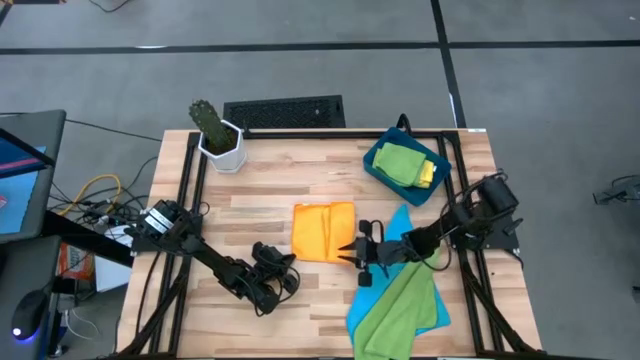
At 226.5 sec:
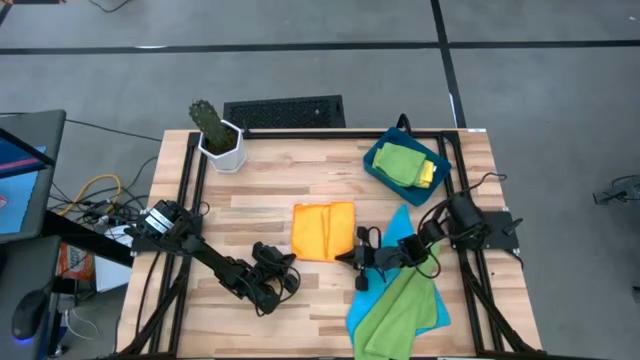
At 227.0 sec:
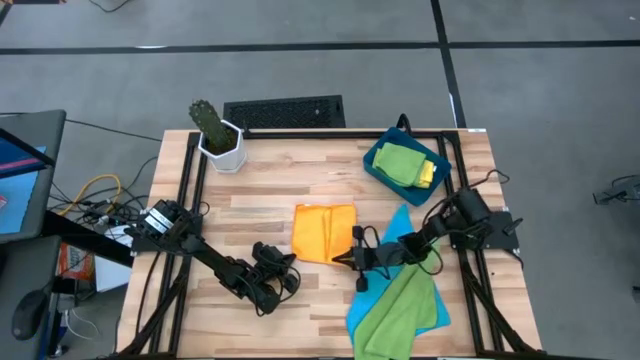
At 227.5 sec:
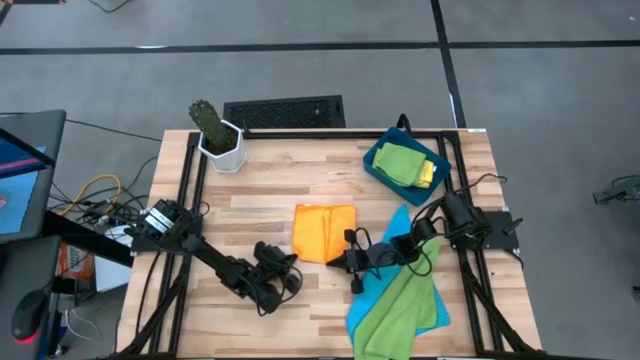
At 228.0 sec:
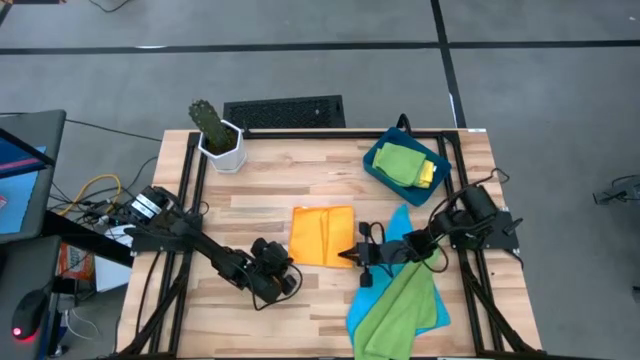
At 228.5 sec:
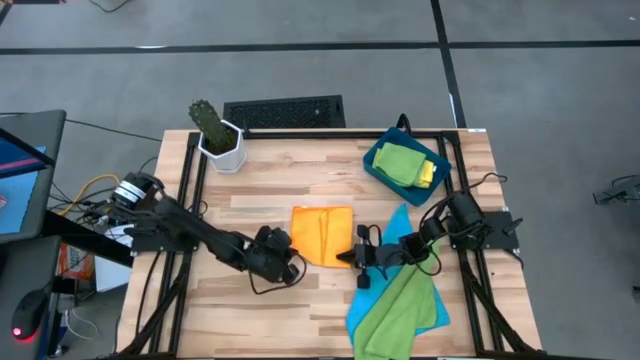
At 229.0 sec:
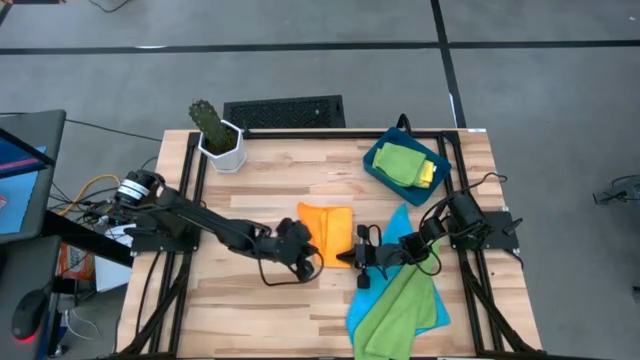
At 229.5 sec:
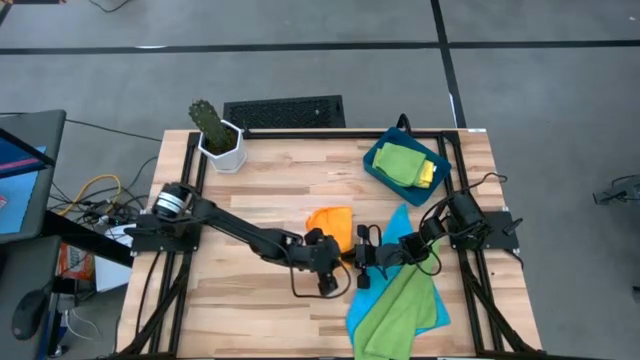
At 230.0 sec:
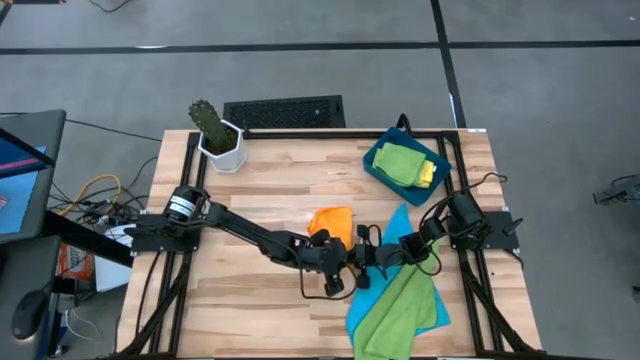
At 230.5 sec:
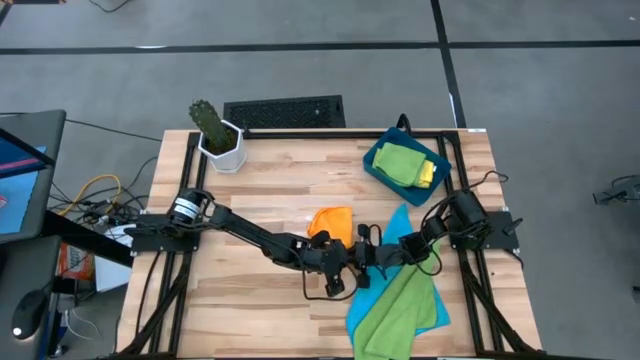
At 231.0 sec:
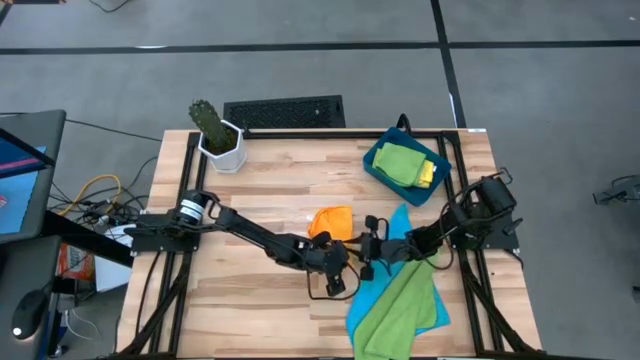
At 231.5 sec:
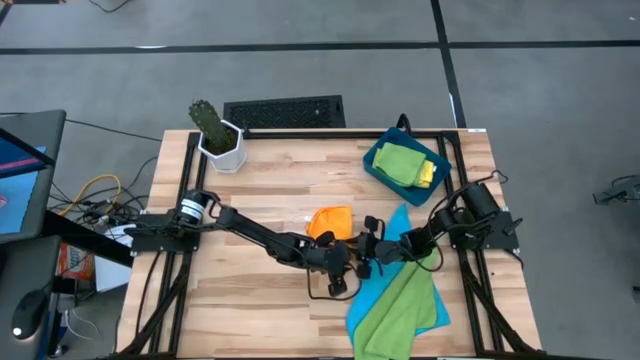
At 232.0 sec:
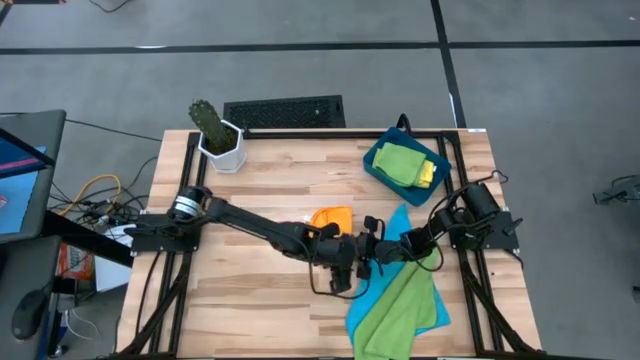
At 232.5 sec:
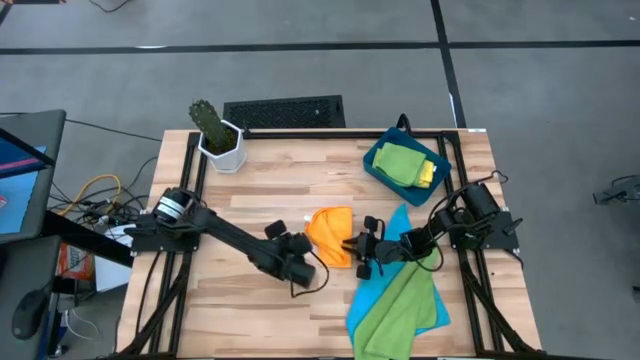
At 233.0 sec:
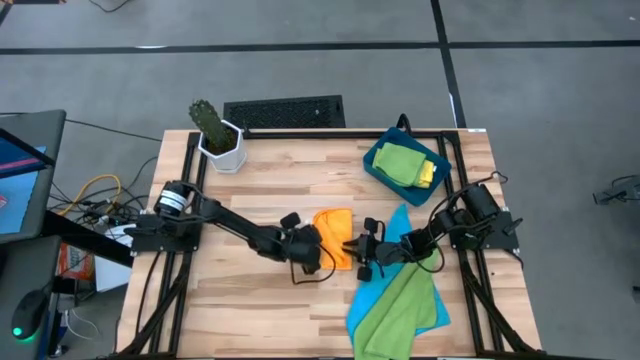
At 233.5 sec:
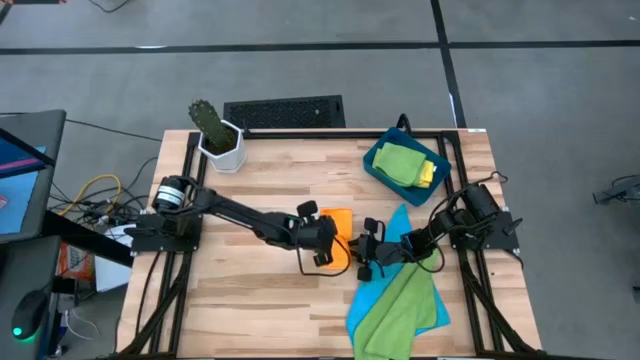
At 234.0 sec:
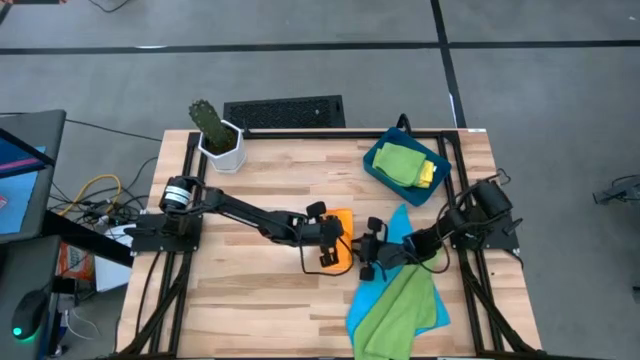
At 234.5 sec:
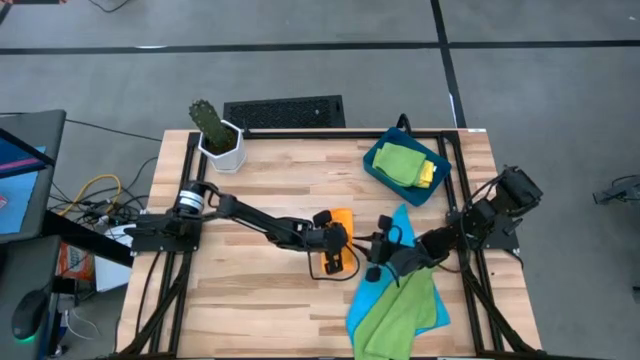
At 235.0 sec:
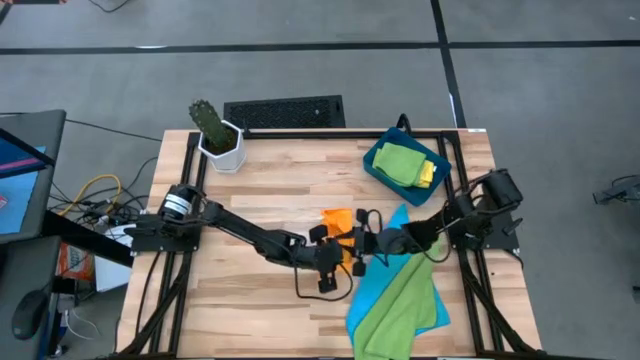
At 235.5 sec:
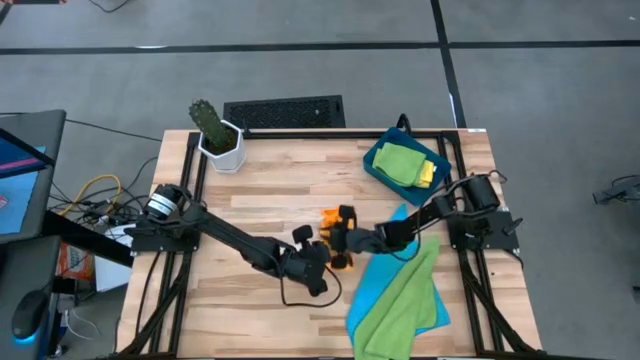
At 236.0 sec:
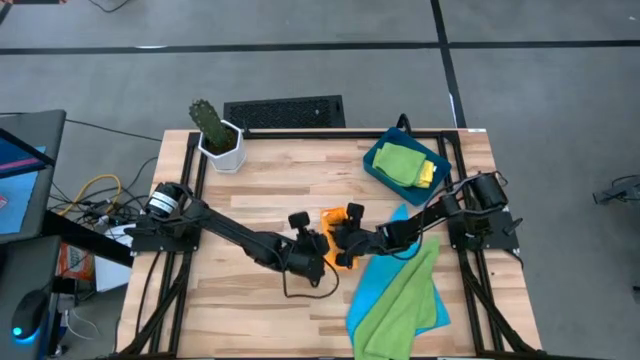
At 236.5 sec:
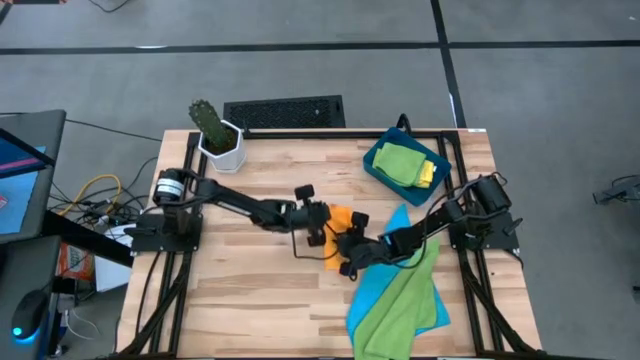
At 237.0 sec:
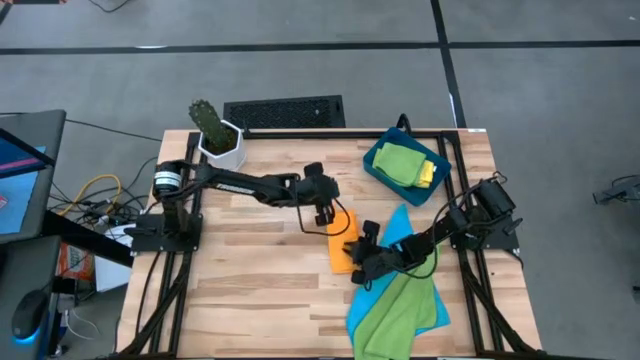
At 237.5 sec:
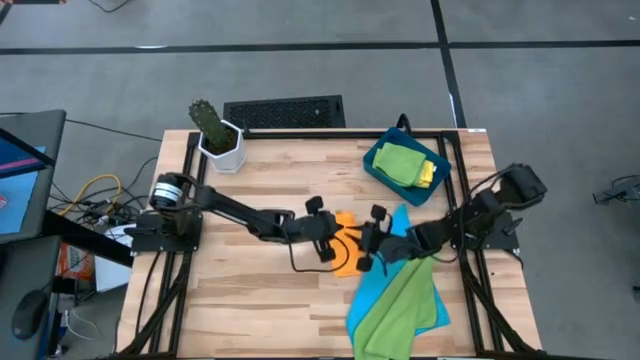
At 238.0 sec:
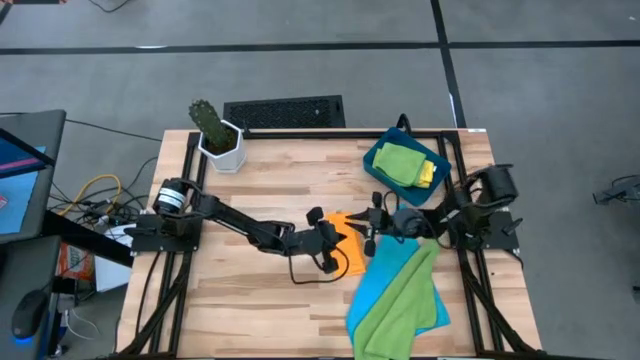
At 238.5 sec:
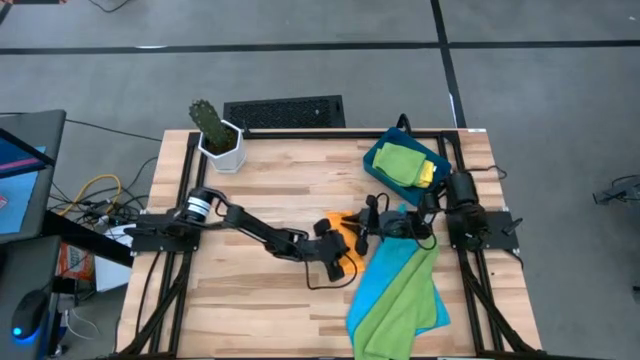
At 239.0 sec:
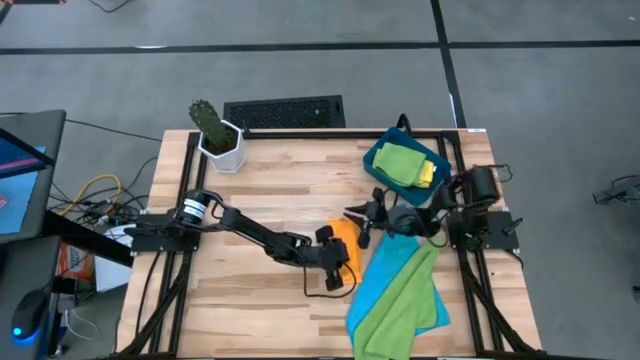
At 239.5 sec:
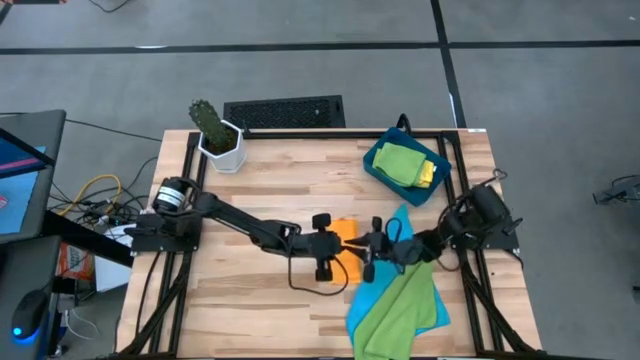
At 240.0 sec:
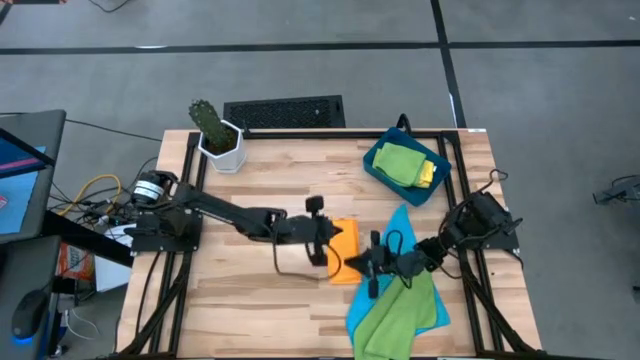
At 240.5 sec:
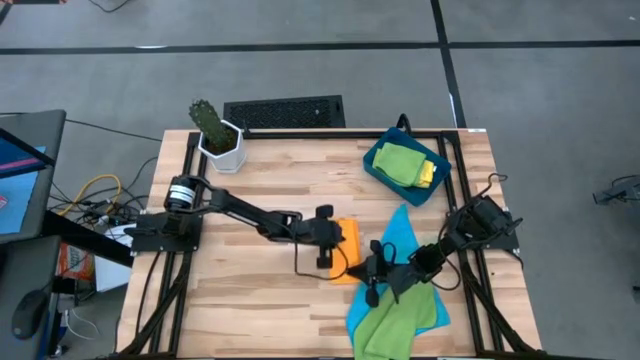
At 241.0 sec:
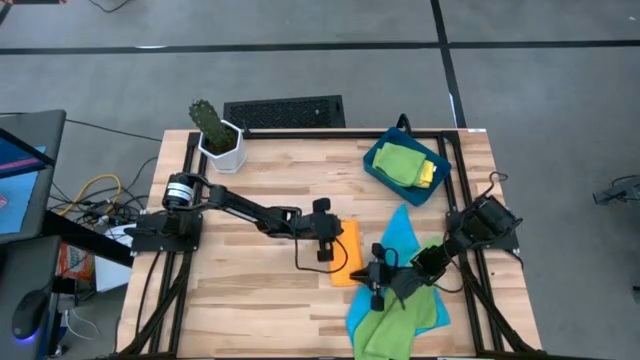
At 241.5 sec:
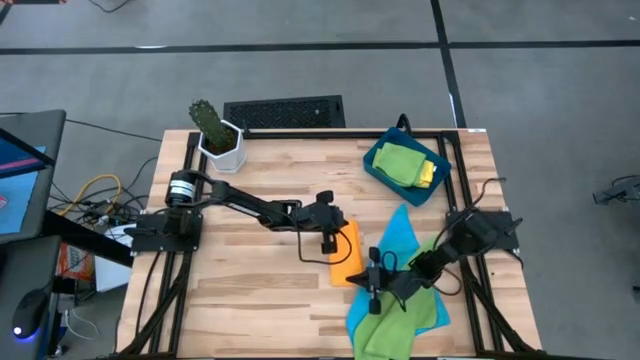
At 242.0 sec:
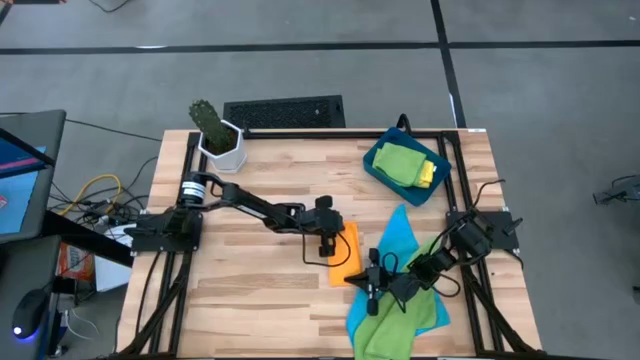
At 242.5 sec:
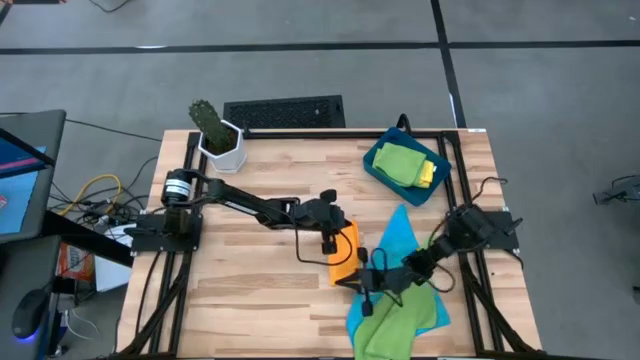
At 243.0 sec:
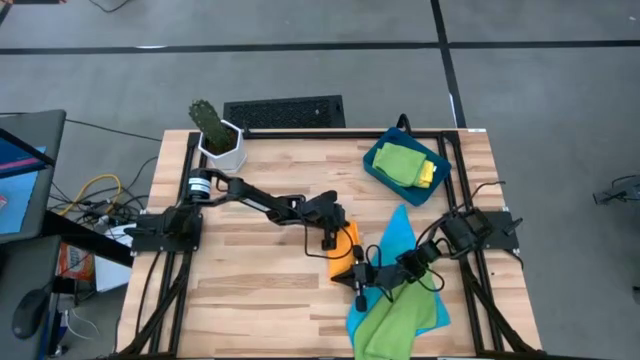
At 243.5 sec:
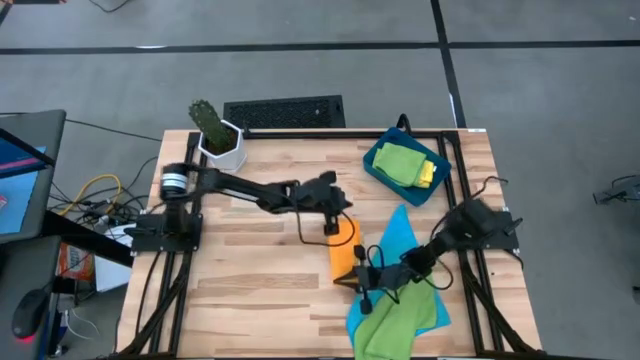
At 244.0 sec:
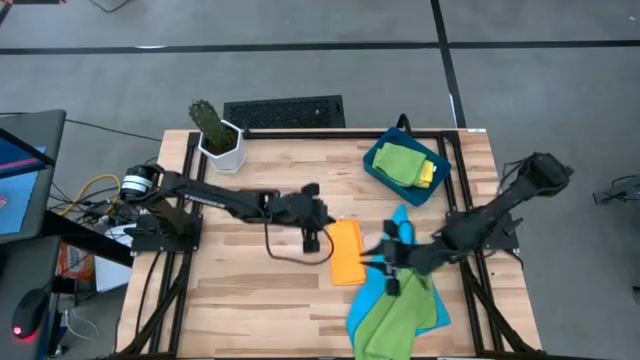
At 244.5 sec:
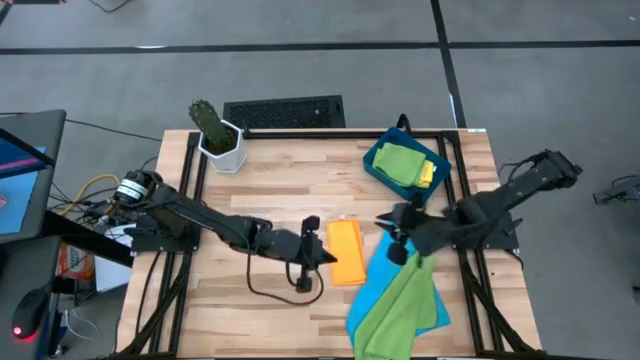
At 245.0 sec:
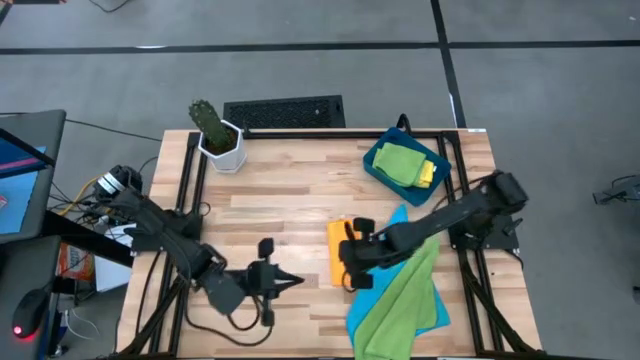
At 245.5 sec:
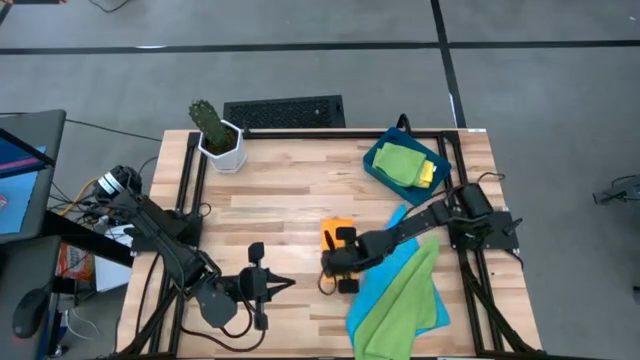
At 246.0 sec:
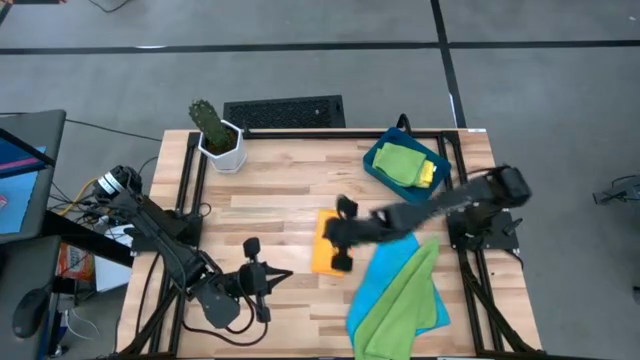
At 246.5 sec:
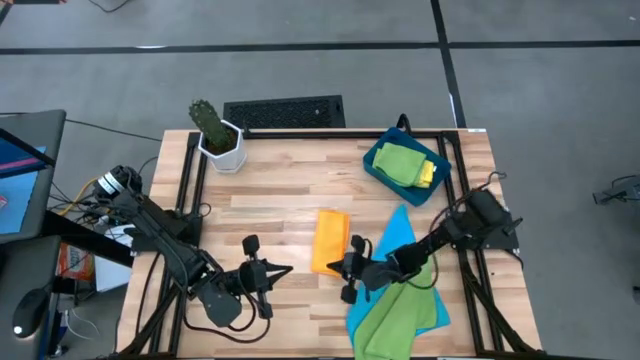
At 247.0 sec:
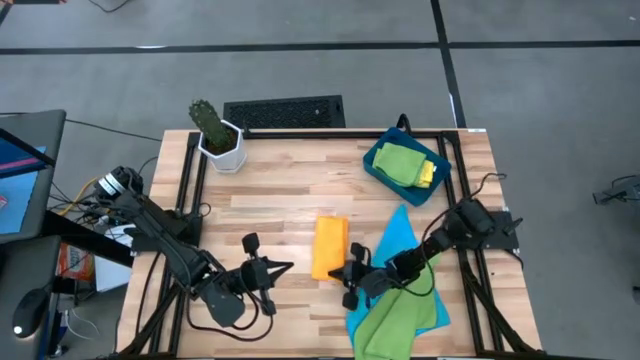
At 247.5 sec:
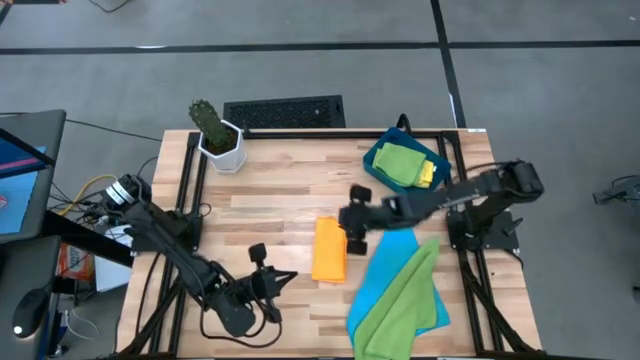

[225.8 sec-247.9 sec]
Task: Fold microfiber towels
Fold the orange microfiber cloth
